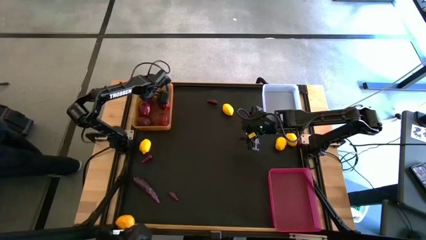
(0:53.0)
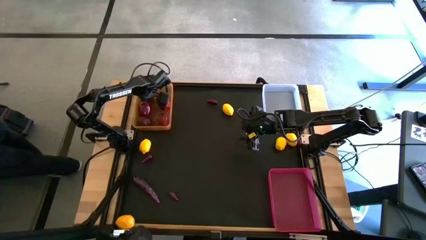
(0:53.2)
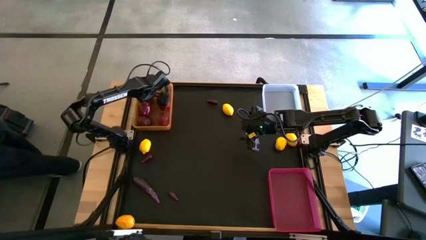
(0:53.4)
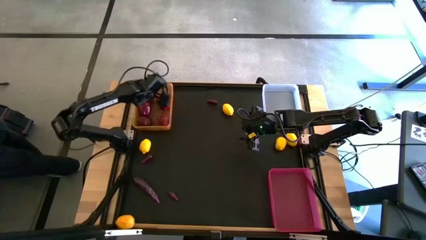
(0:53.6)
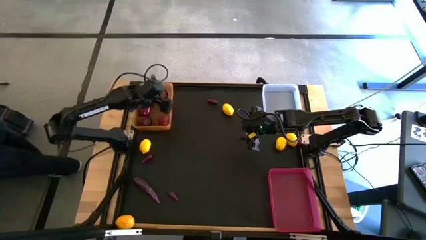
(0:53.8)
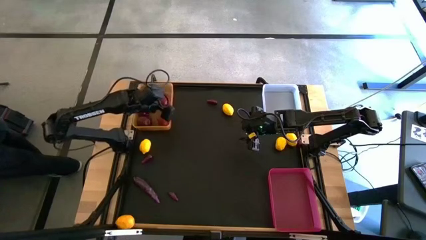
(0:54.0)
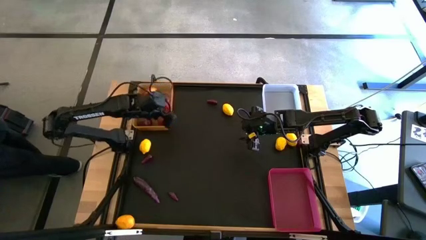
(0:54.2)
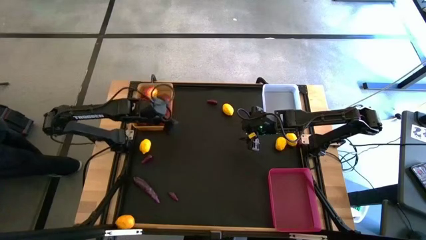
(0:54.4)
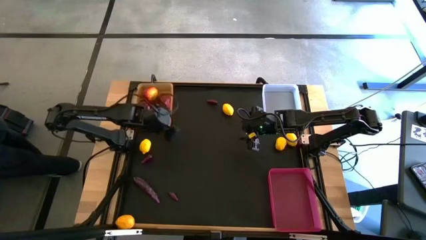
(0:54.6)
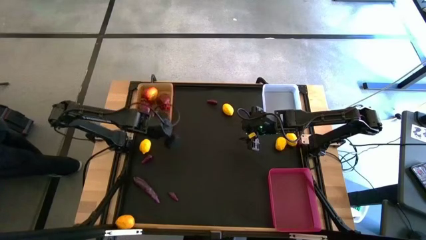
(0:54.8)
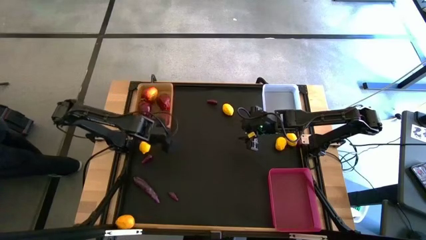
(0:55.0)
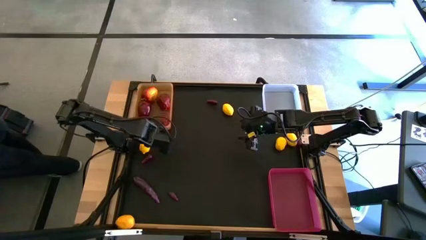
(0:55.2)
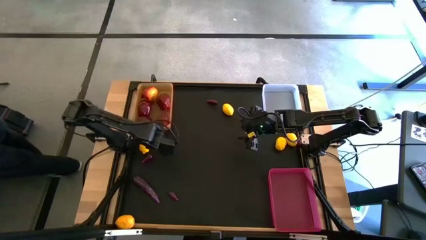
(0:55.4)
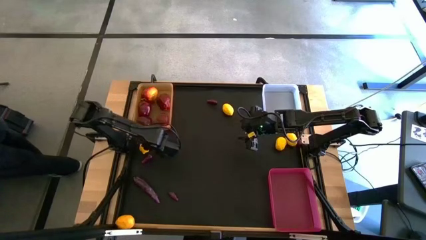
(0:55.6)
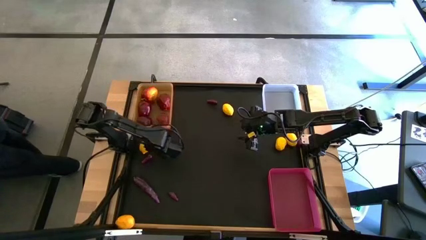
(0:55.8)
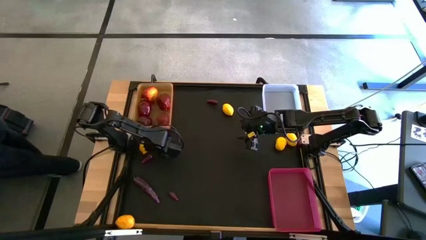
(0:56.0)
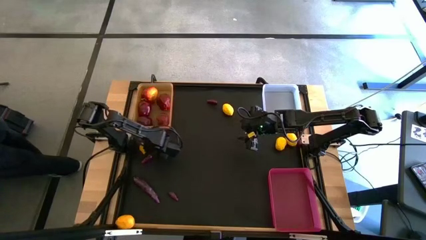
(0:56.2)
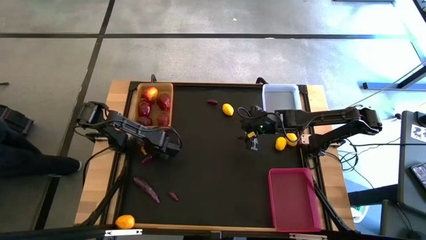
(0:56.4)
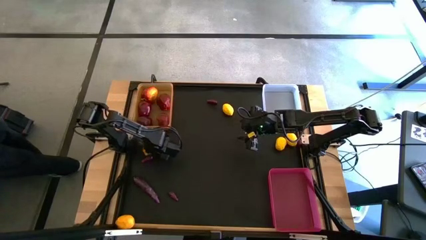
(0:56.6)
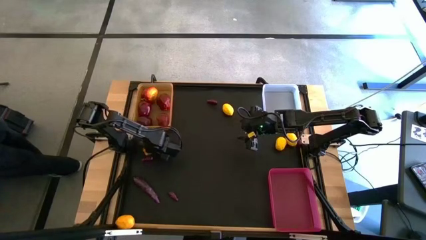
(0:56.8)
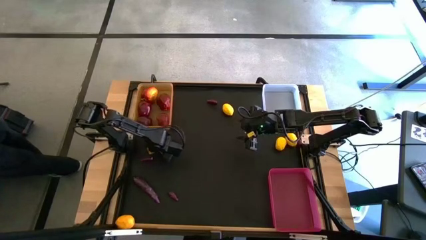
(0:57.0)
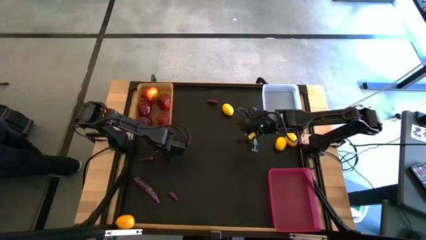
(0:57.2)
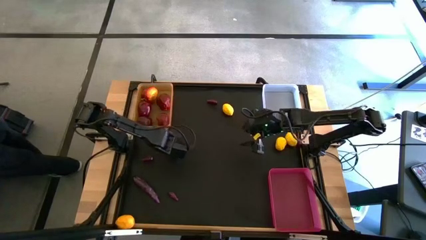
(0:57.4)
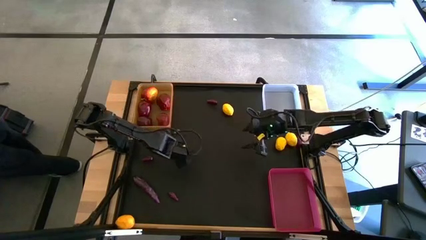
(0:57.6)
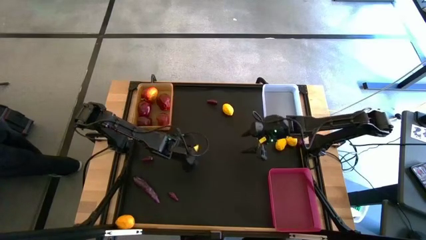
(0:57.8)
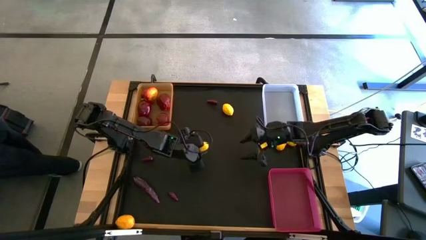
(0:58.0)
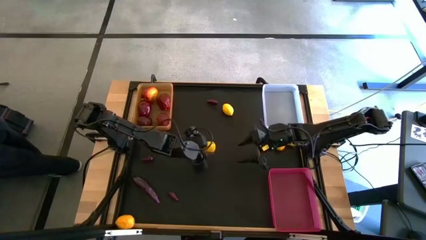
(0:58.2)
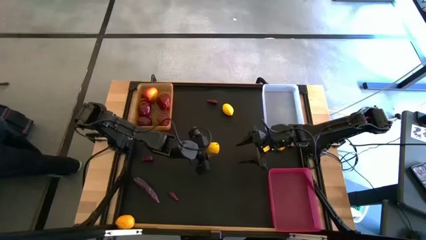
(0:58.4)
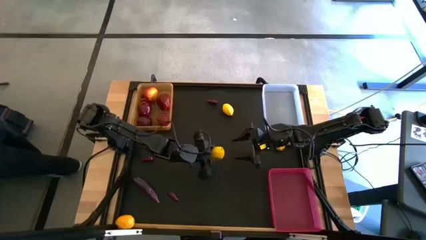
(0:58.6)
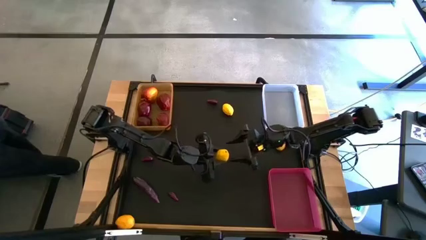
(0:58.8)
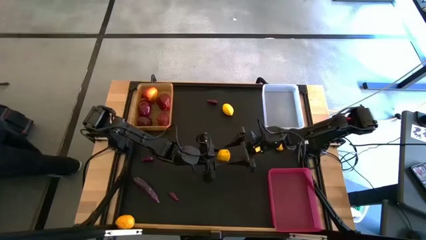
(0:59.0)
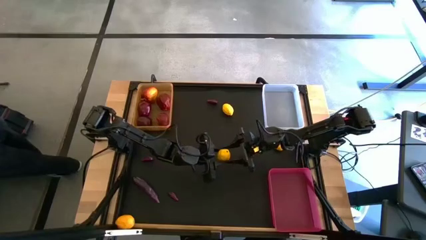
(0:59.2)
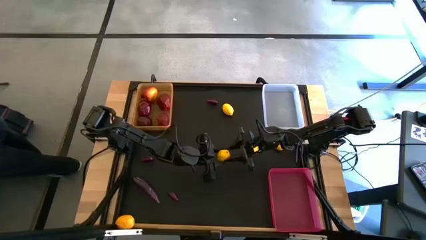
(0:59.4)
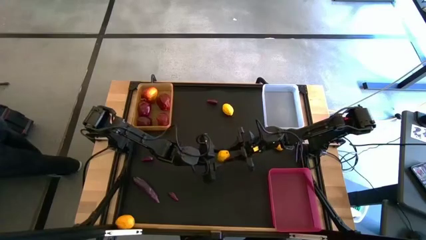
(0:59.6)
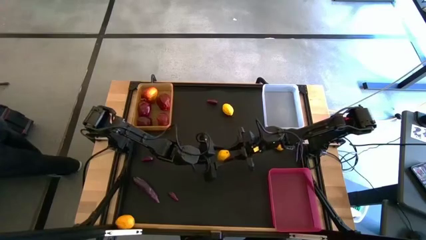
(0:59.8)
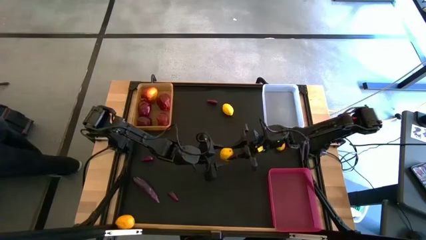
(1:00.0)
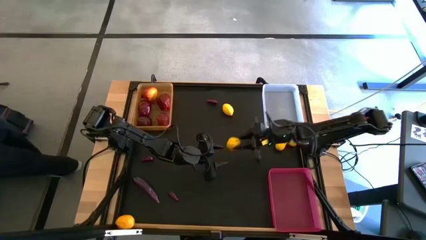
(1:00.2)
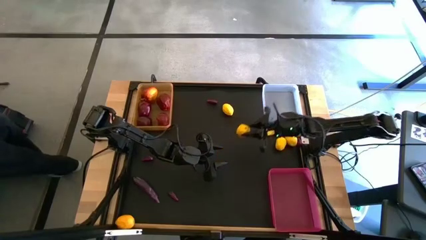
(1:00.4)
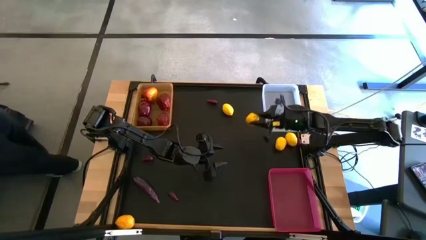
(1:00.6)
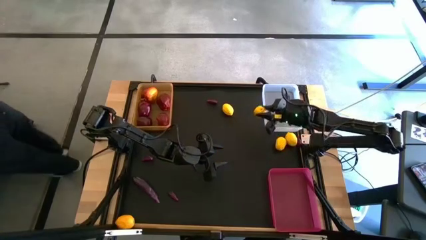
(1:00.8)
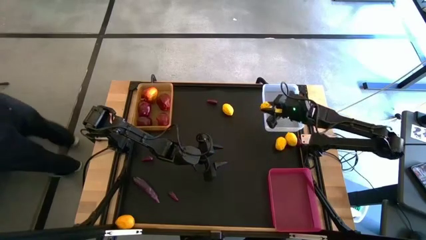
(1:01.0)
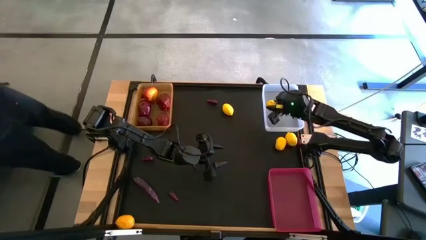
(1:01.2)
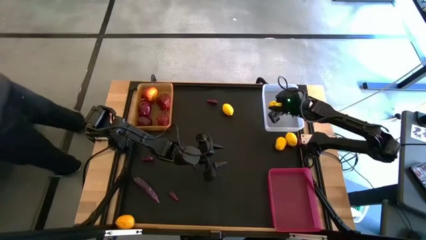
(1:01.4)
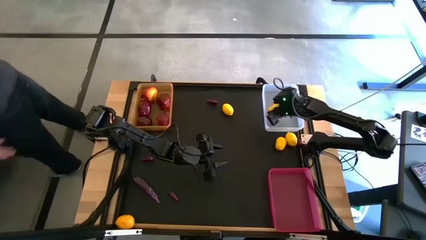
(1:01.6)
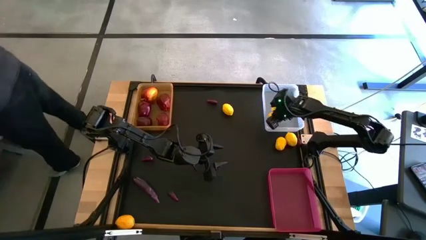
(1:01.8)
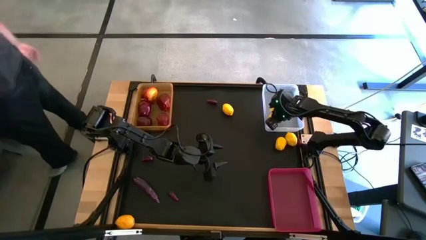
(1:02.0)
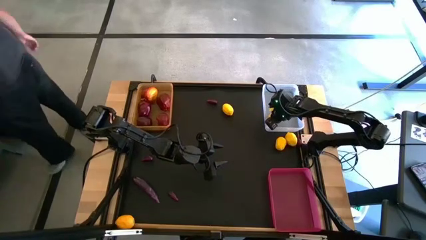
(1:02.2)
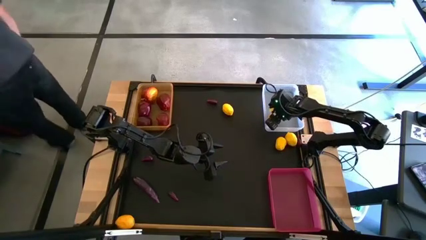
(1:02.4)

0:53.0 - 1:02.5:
Task: Sort produce into baskets
Put the lemon into the white bin

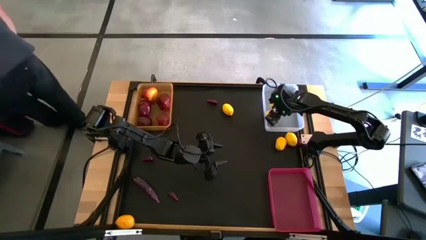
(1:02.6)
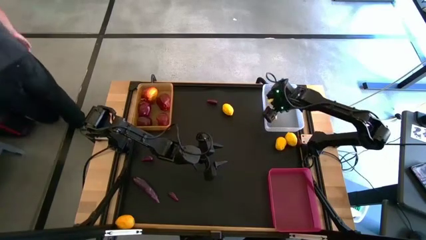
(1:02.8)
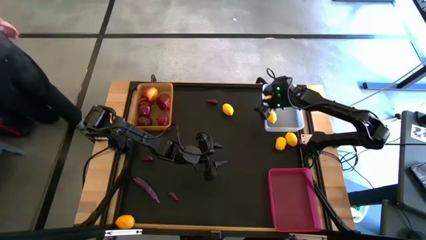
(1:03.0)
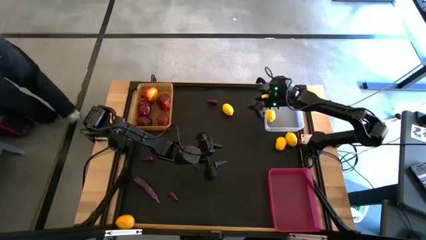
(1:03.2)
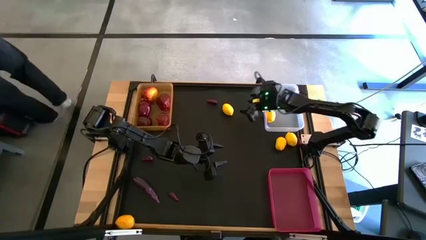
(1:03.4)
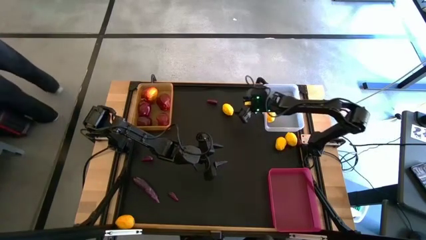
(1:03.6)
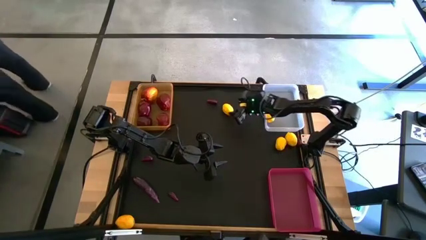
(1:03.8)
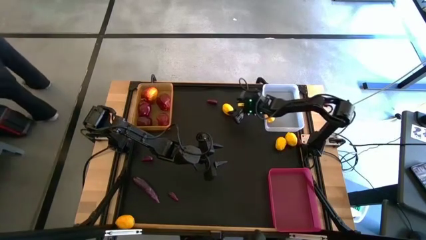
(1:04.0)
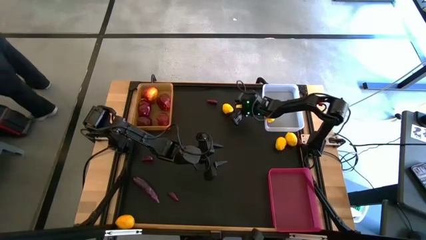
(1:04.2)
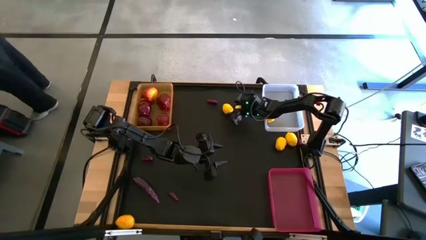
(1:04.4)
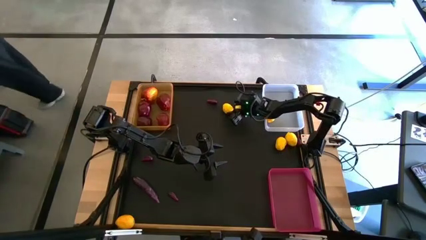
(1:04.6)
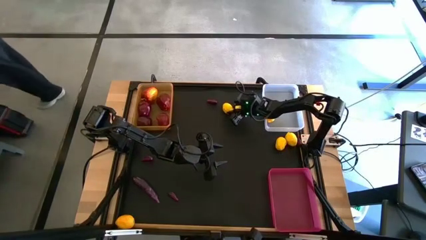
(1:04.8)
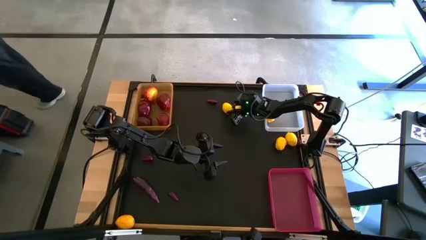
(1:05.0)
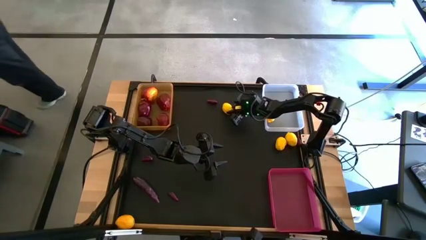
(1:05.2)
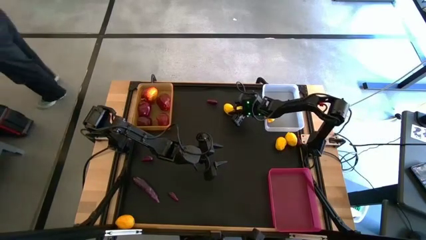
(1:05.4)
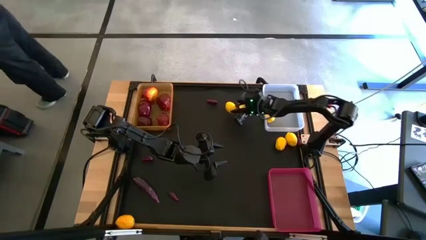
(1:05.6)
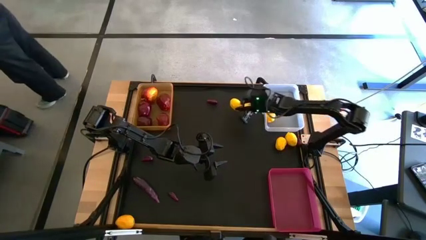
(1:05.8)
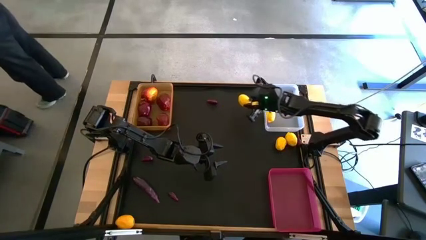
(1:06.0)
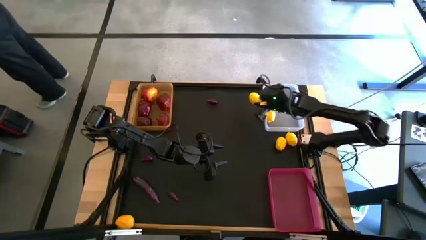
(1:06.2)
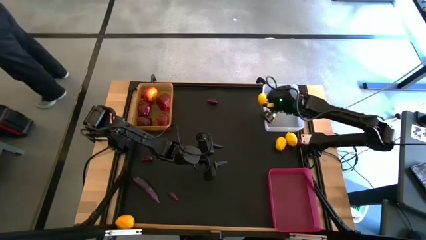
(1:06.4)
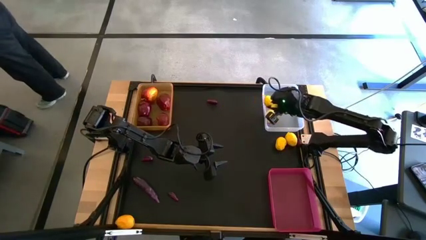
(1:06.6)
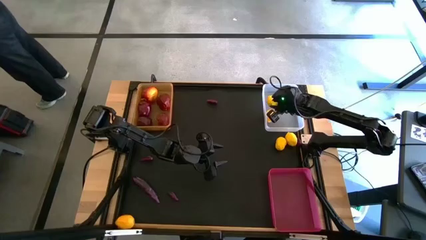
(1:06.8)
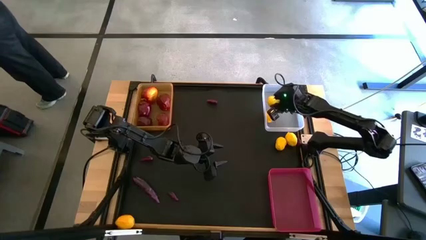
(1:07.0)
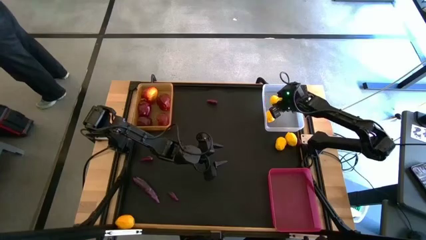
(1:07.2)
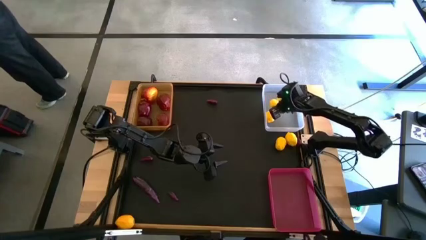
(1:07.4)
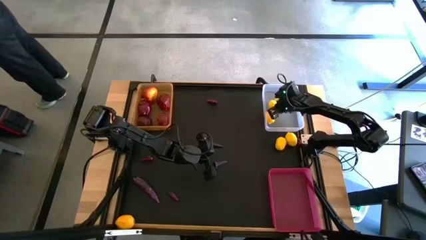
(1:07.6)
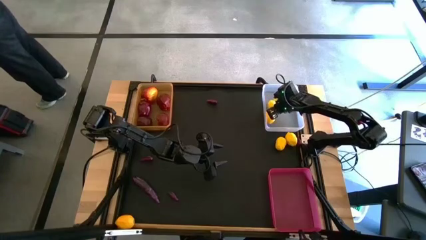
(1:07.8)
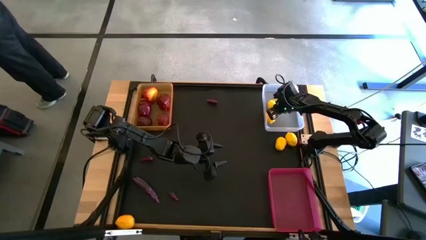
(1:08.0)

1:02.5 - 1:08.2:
Put the lemon into the white bin

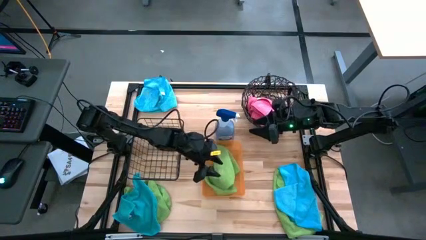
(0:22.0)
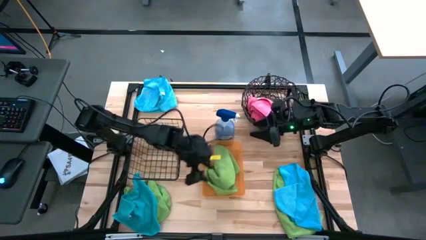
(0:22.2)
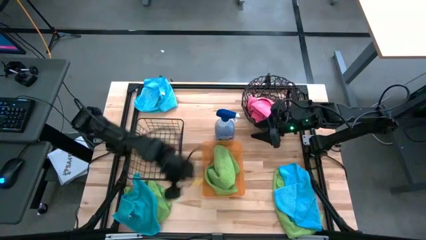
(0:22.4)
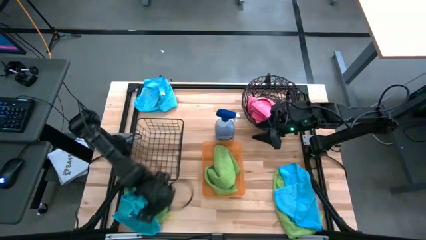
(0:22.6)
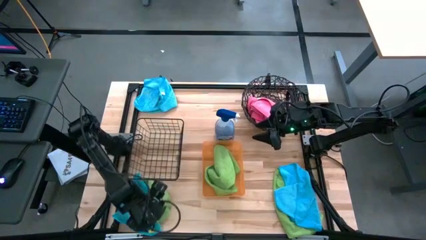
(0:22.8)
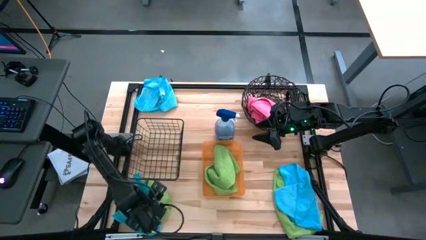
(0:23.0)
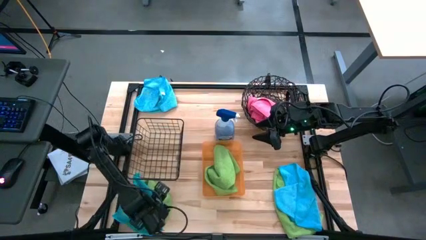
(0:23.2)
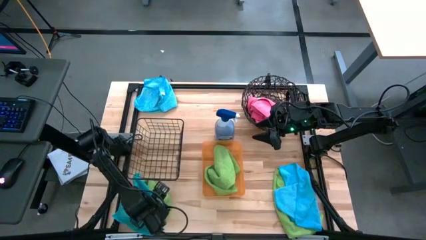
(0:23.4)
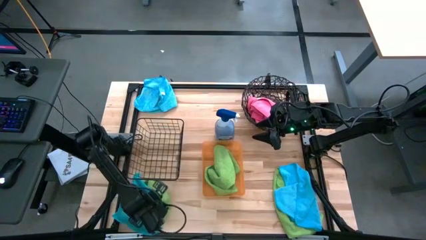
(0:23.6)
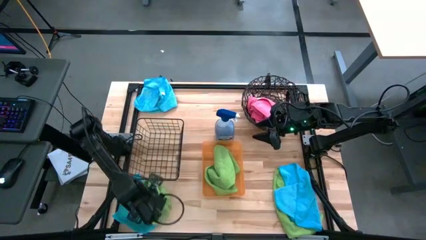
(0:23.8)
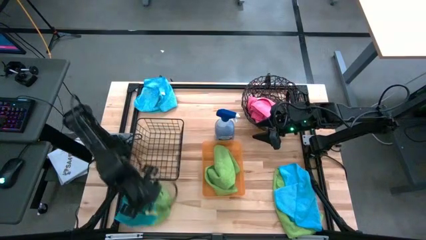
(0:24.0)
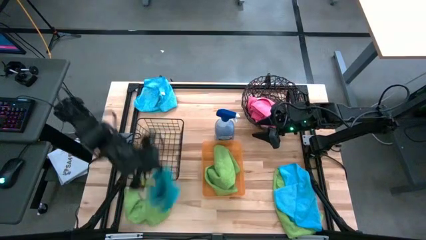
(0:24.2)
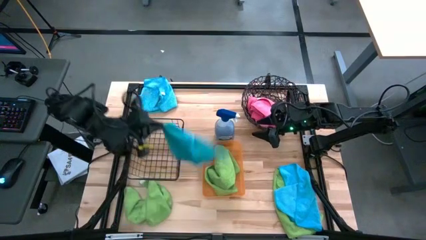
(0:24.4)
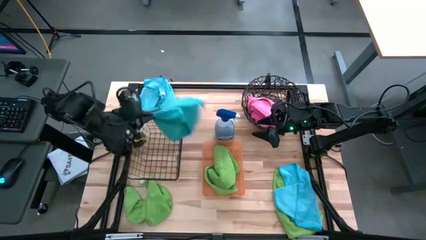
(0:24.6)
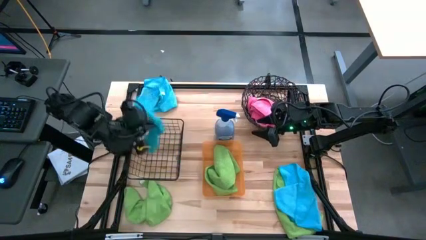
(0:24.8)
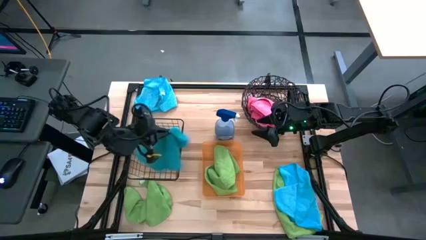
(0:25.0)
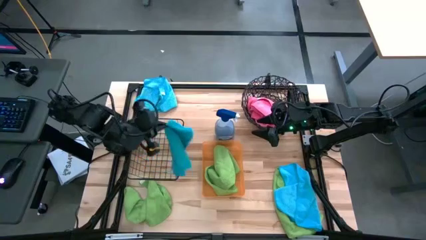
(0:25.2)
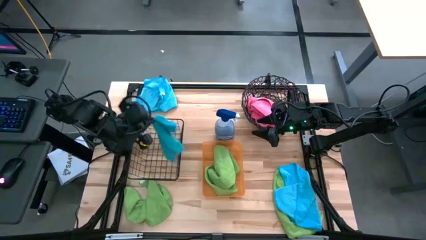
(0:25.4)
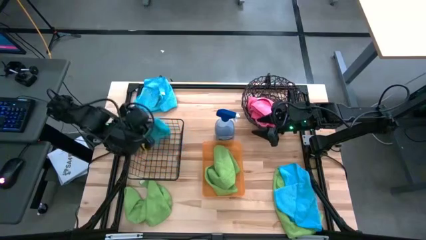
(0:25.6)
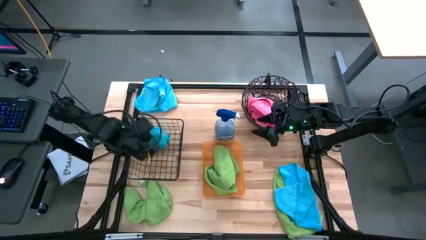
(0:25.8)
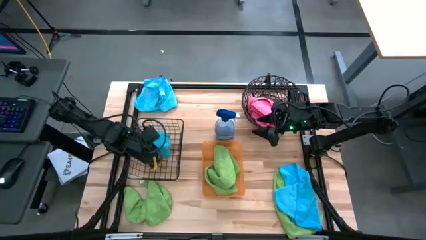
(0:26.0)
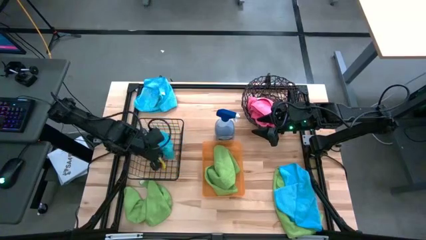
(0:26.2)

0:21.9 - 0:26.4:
Task: Sort microfiber towel by color & place in baskets
Put the bottom left blue microfiber cloth into the wire basket
